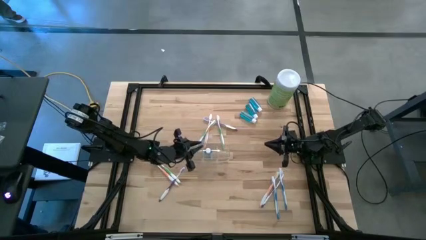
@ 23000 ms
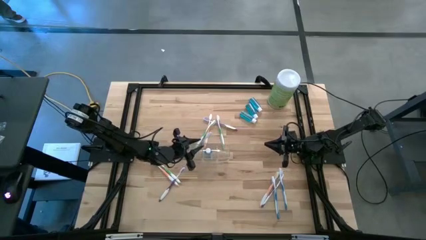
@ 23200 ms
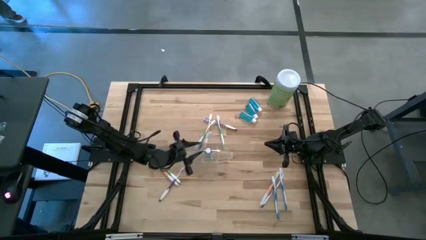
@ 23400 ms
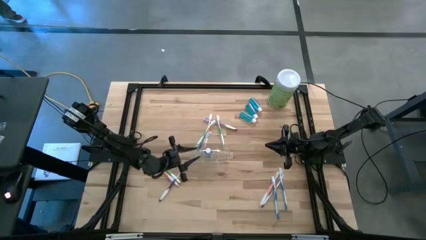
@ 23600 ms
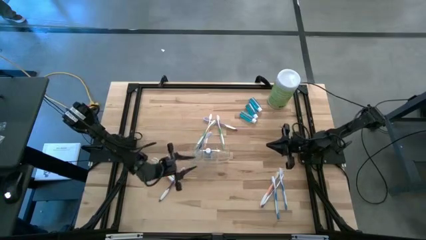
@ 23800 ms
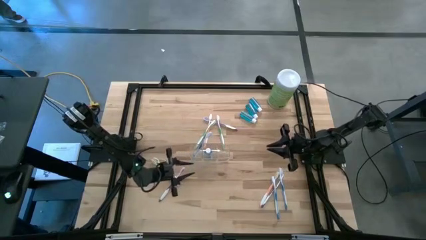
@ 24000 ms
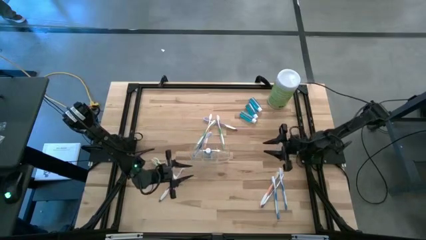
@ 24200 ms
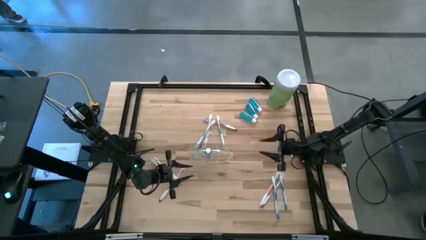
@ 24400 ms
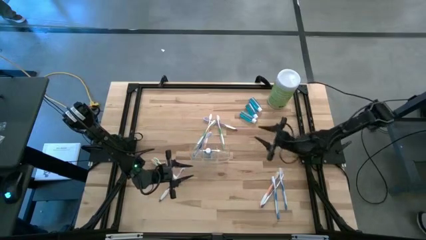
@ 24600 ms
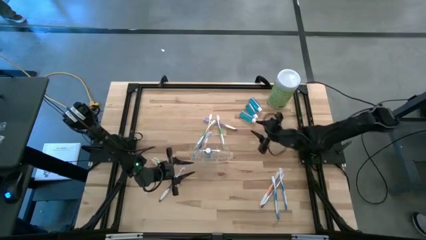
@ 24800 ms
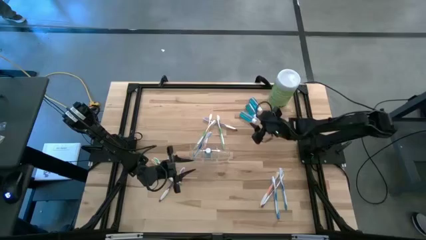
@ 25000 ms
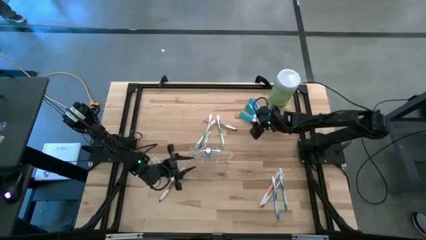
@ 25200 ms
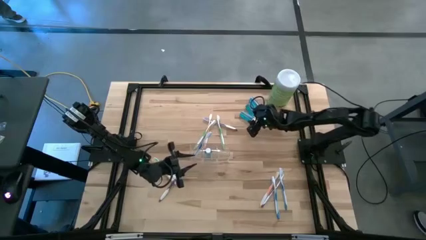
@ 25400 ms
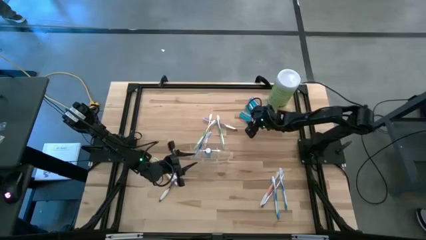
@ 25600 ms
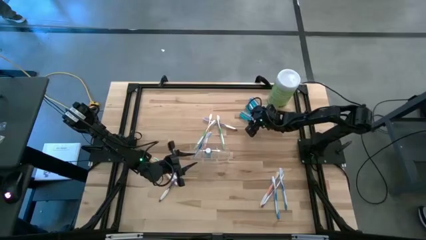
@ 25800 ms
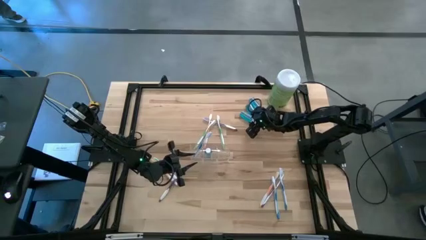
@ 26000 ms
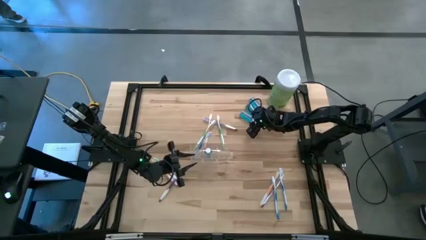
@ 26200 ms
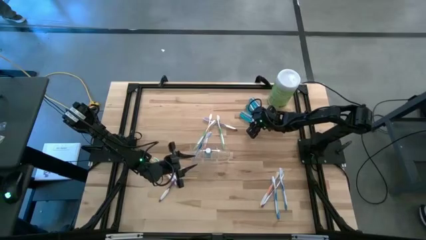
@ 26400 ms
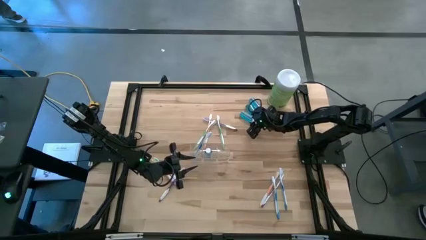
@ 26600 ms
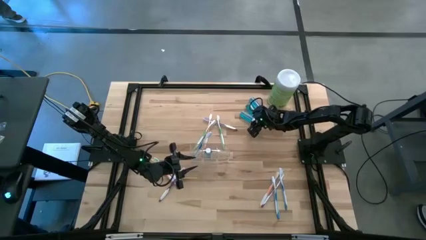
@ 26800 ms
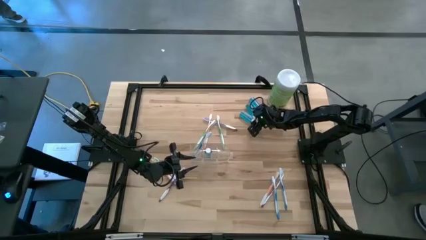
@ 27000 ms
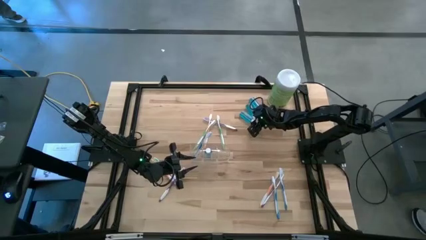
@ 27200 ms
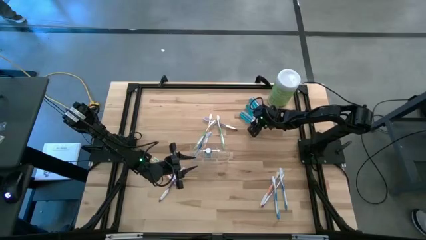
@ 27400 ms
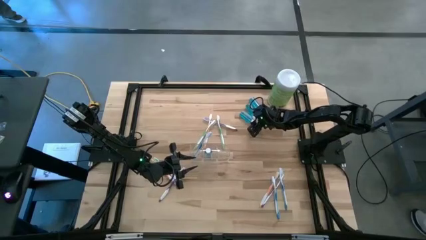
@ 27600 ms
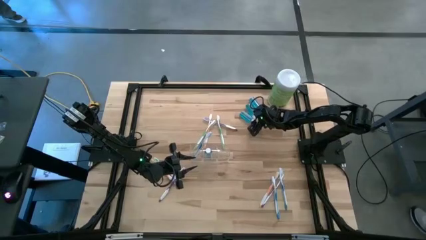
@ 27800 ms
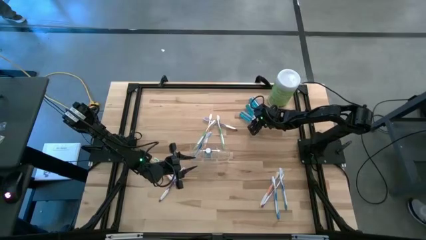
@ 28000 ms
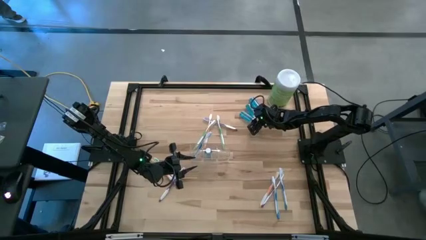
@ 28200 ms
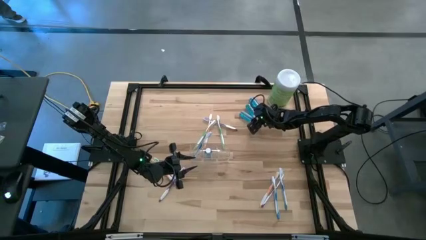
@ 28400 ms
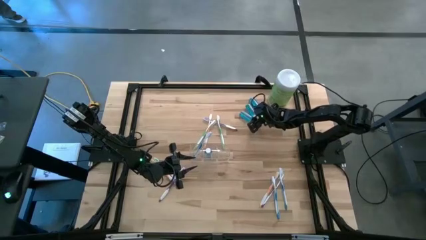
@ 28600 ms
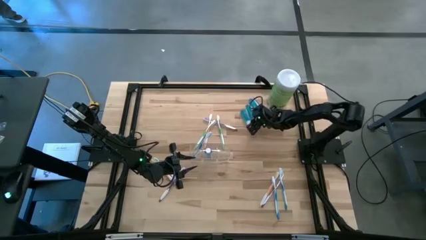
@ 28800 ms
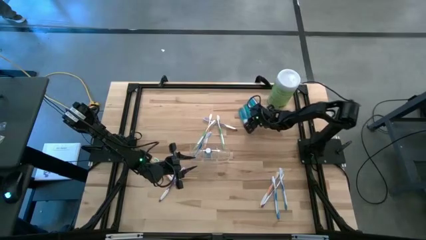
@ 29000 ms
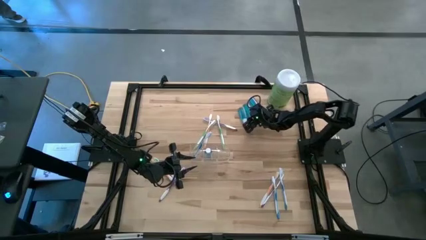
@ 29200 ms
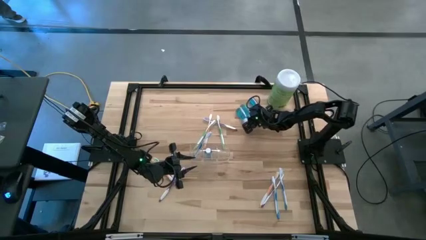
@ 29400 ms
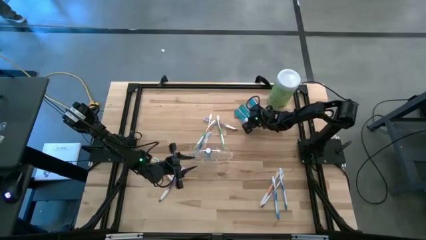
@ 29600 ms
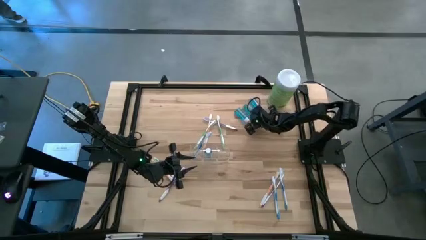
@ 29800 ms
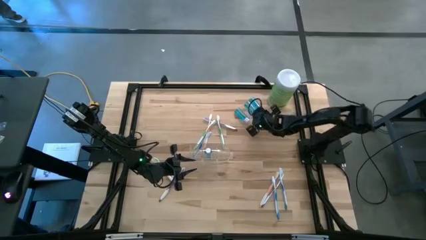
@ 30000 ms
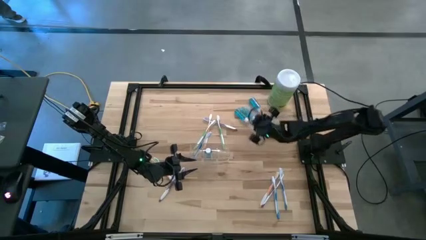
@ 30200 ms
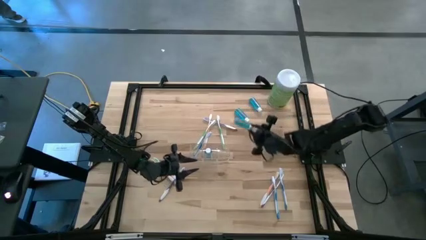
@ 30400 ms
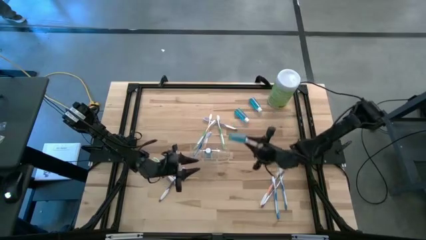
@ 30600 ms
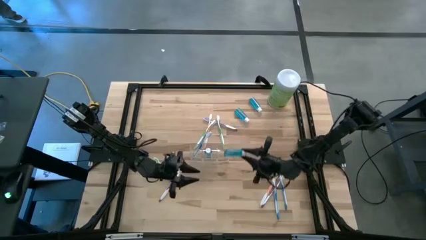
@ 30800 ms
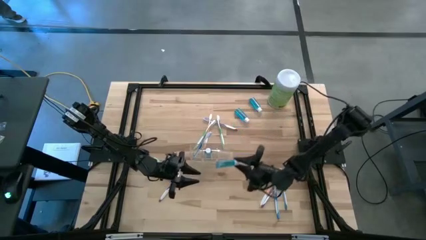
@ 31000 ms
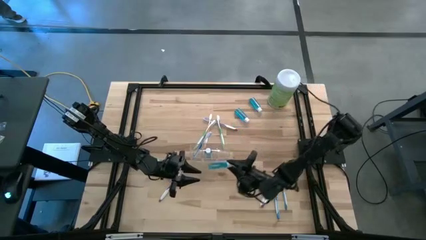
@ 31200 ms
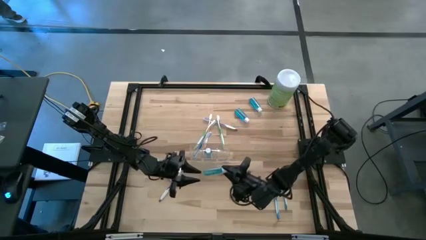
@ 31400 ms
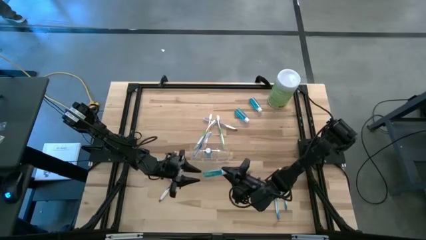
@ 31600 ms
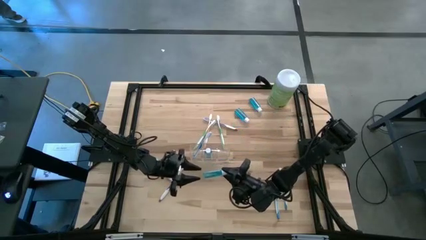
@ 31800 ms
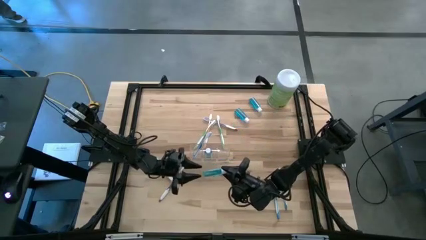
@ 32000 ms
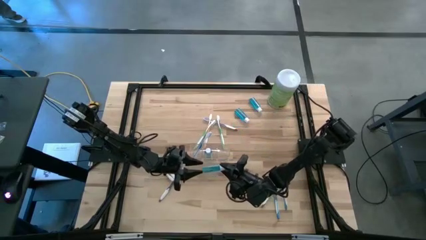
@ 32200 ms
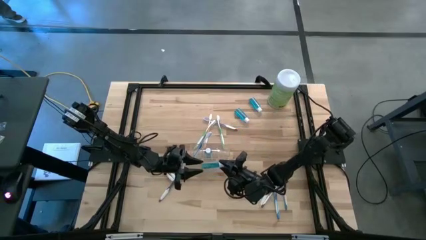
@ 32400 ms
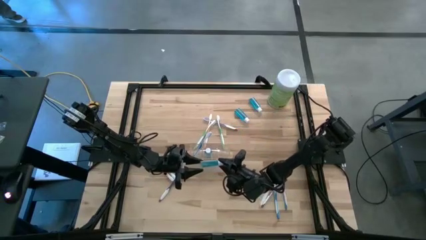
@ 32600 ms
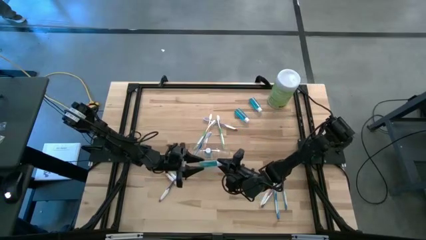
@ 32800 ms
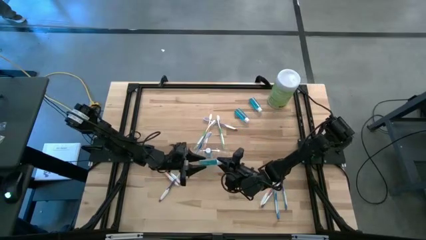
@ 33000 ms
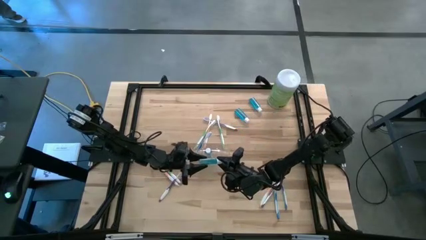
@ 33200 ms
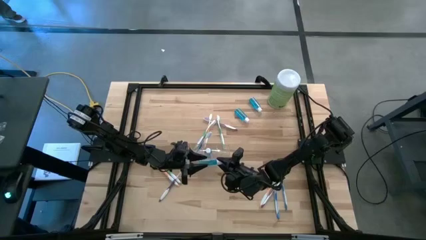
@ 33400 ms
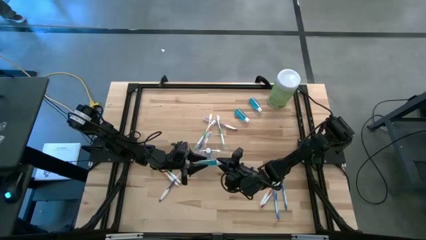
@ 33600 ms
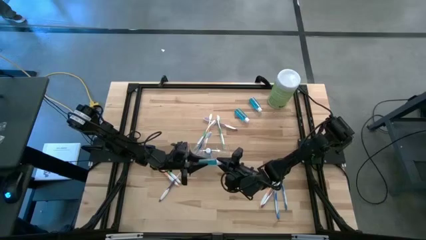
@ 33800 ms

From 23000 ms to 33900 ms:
Task: Pick & Place toothbrushing station
Put the mouthwash into the center of the transparent organizer
